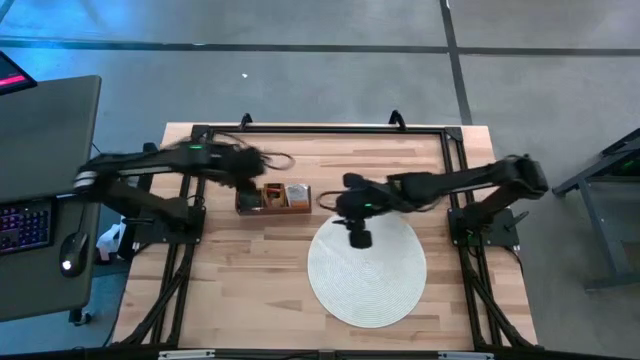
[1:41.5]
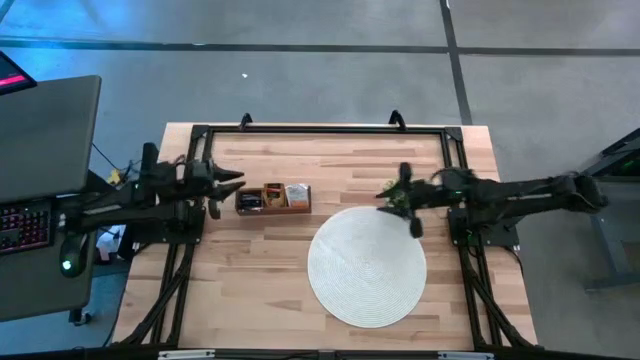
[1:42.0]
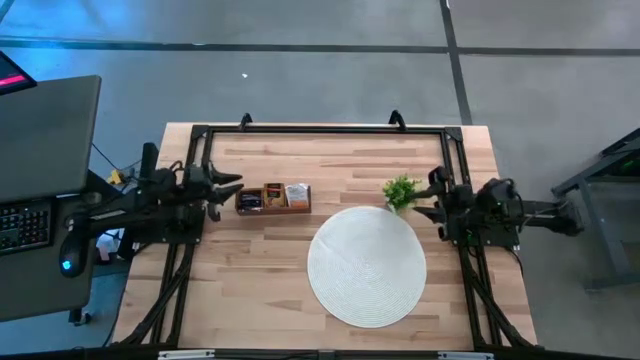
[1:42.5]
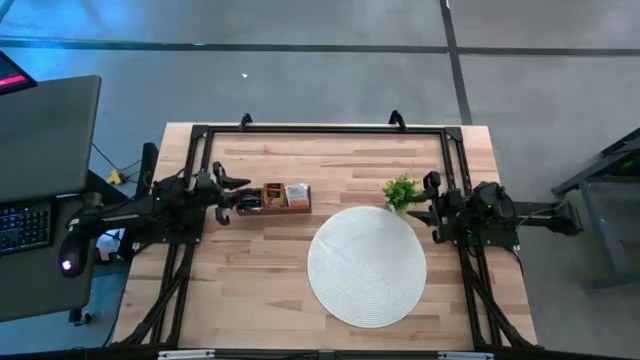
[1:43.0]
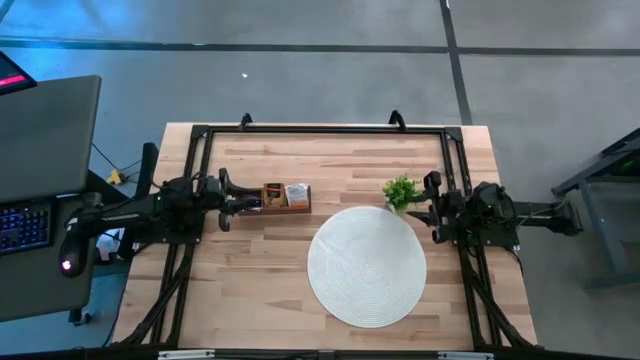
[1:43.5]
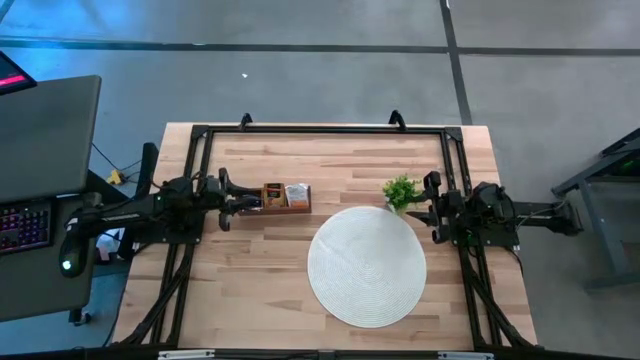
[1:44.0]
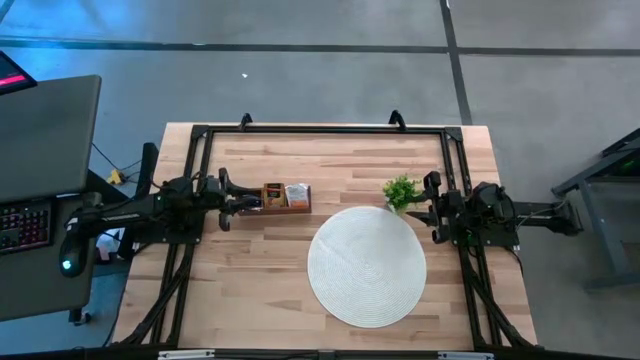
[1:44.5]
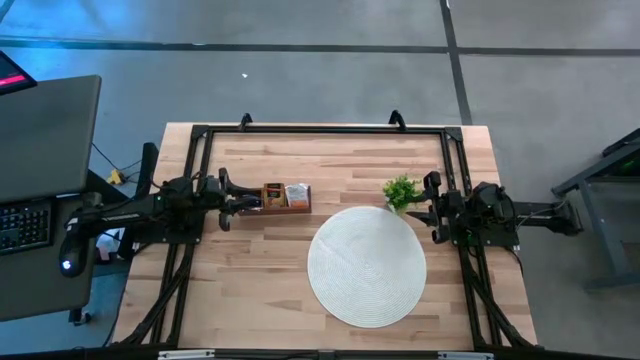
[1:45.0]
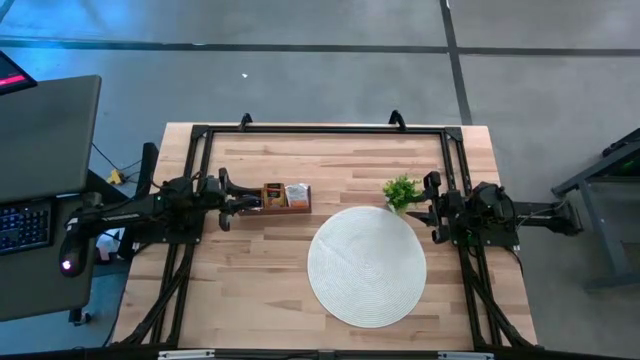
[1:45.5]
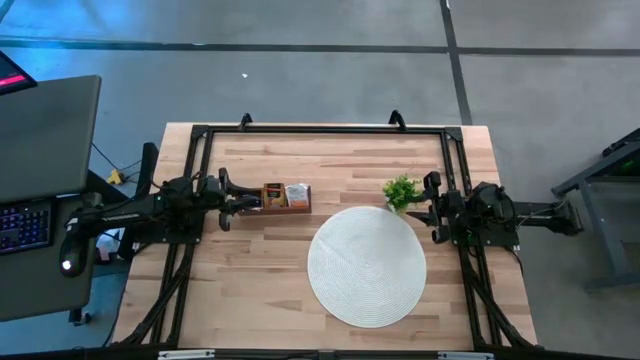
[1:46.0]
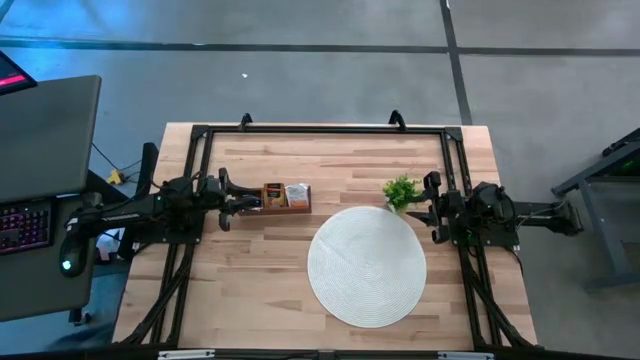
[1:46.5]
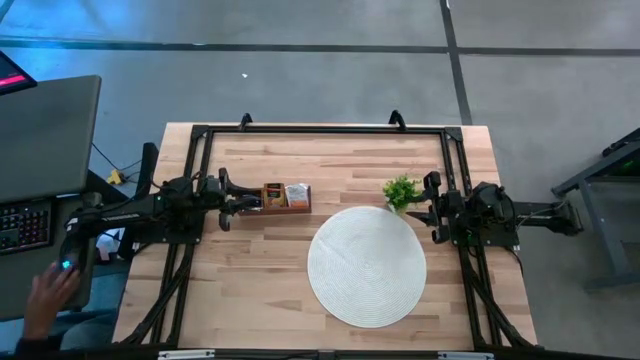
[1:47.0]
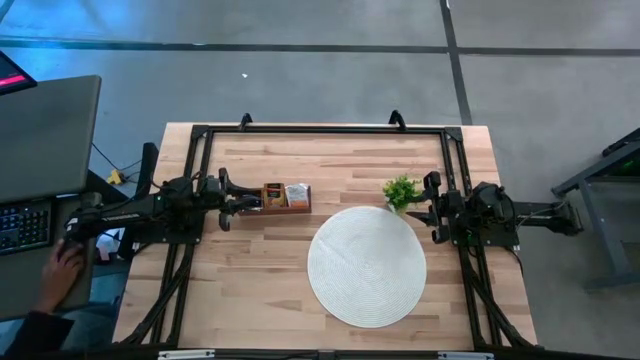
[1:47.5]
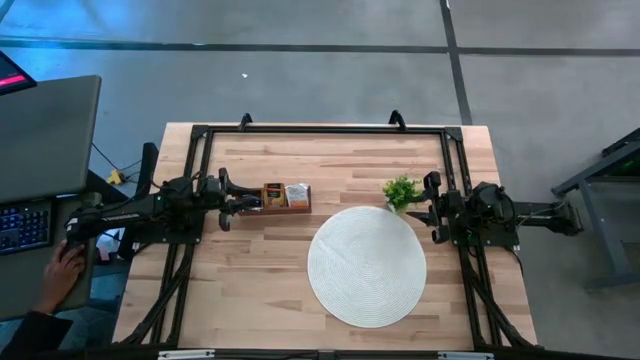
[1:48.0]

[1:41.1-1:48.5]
Task: Pick & Place Tea
Return to Home Position

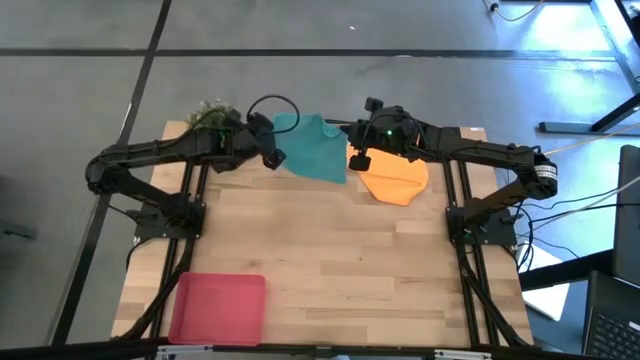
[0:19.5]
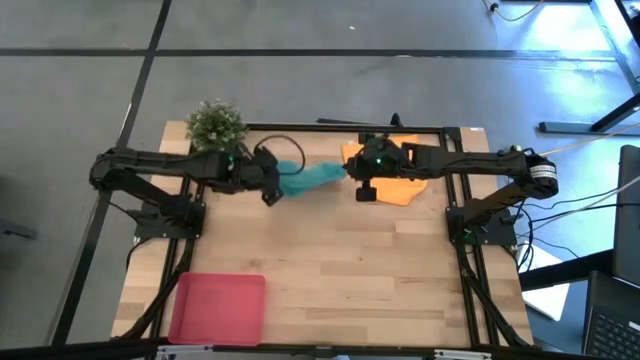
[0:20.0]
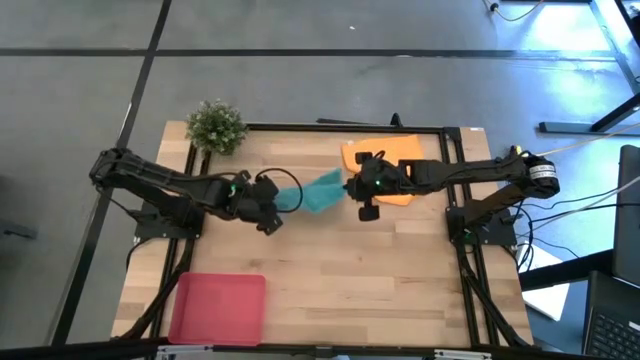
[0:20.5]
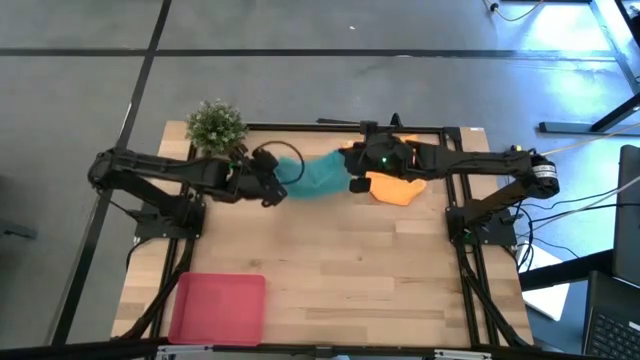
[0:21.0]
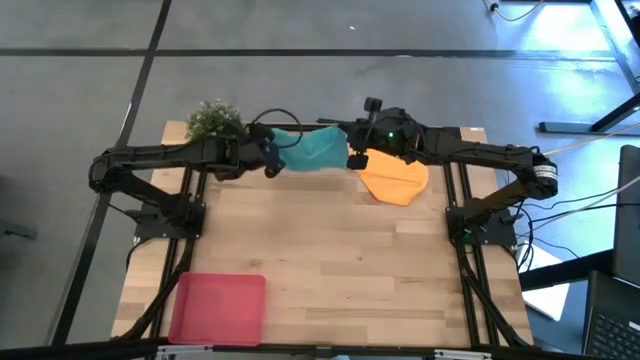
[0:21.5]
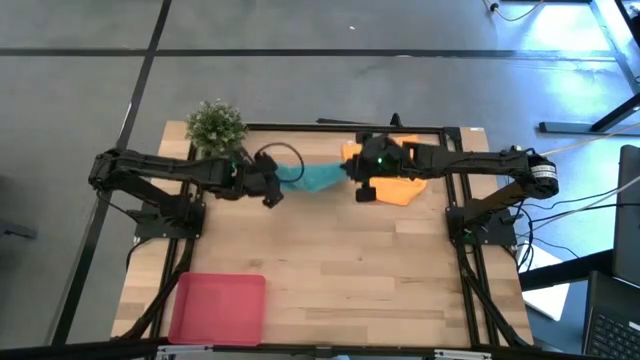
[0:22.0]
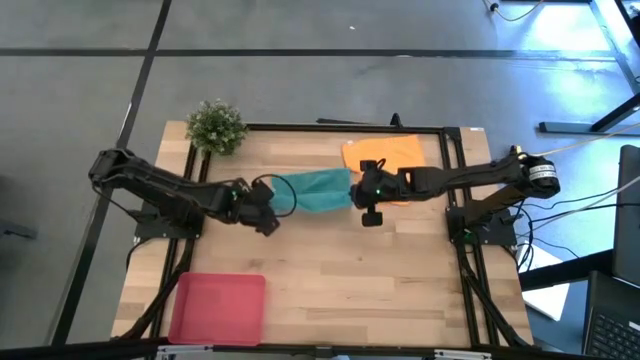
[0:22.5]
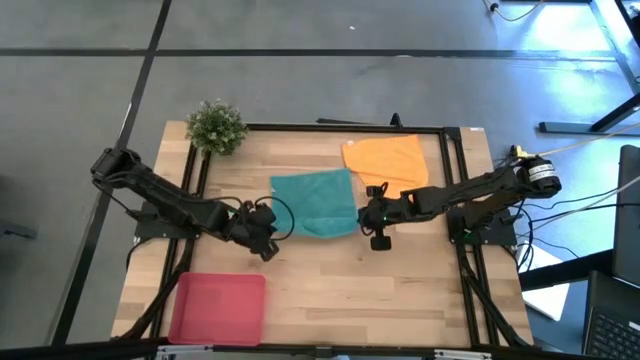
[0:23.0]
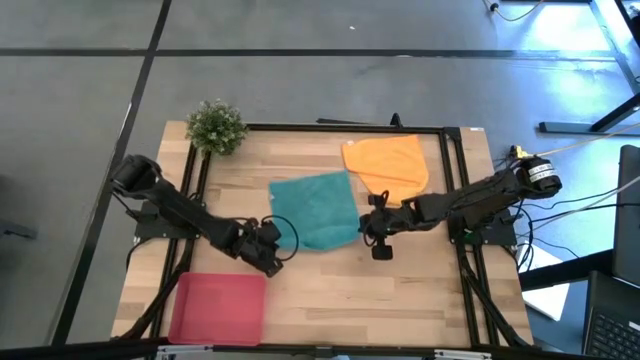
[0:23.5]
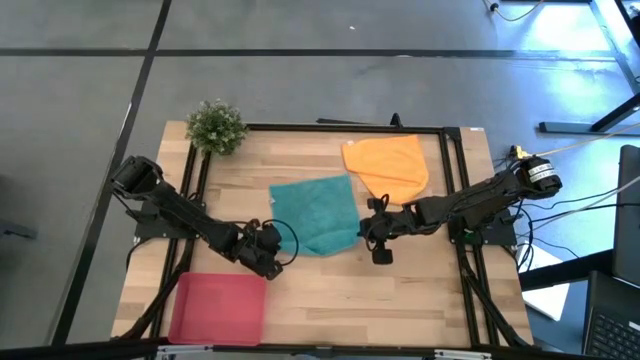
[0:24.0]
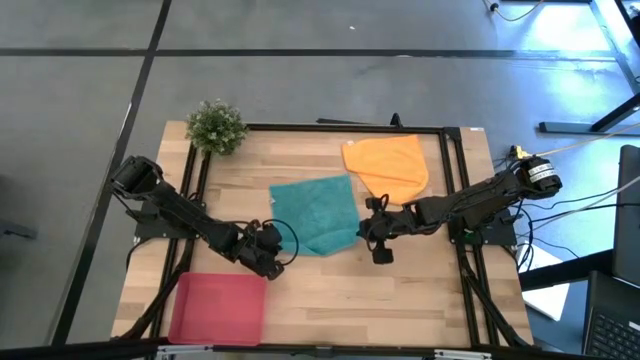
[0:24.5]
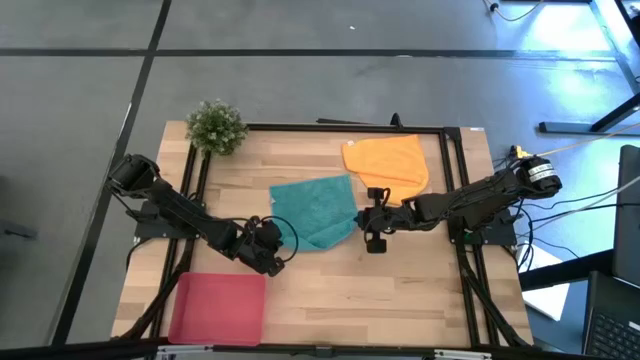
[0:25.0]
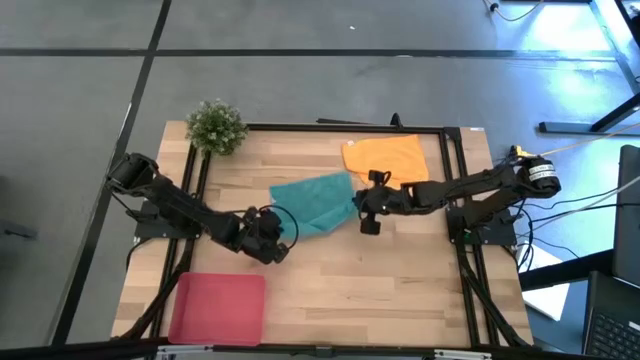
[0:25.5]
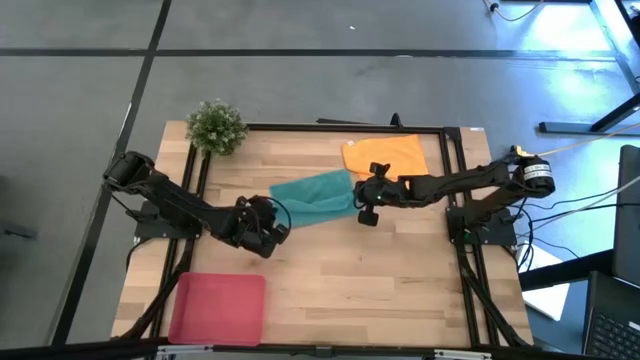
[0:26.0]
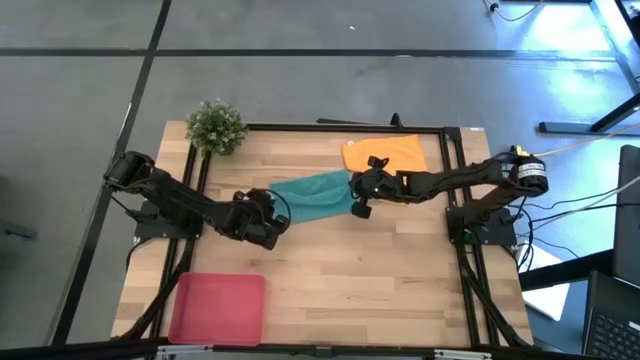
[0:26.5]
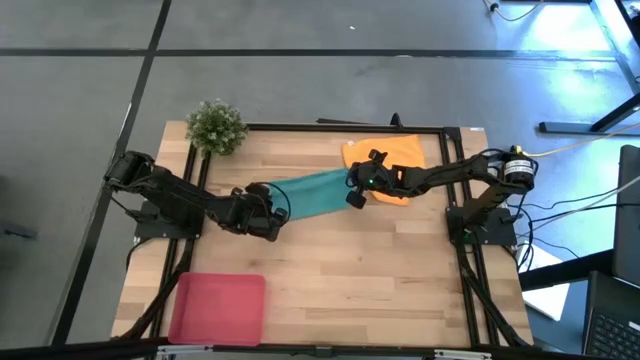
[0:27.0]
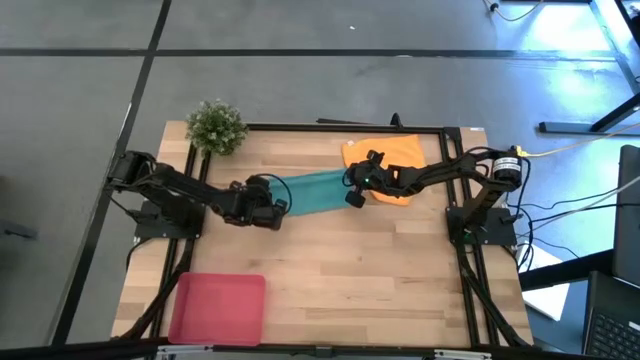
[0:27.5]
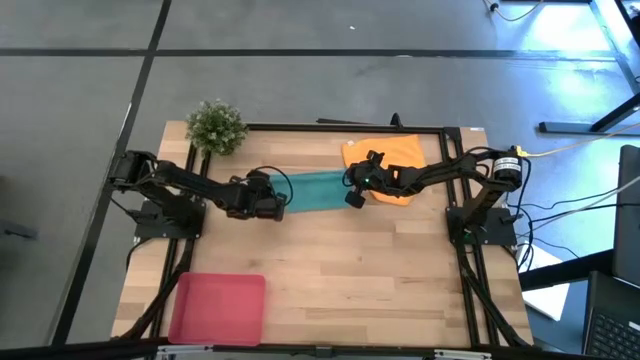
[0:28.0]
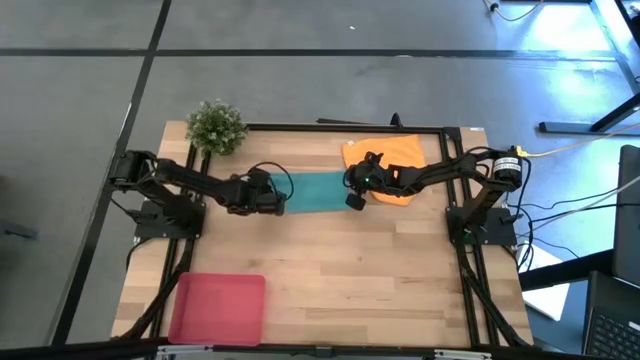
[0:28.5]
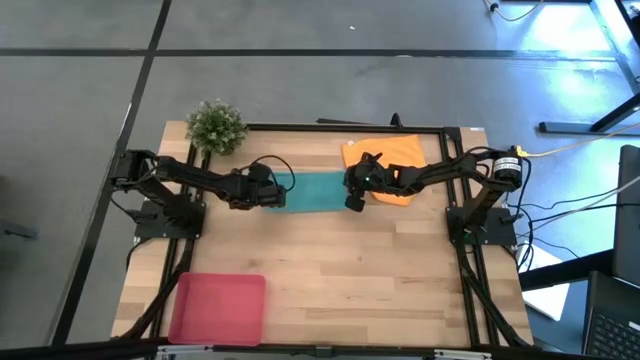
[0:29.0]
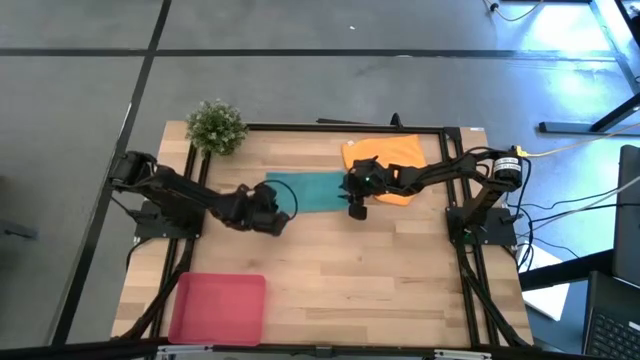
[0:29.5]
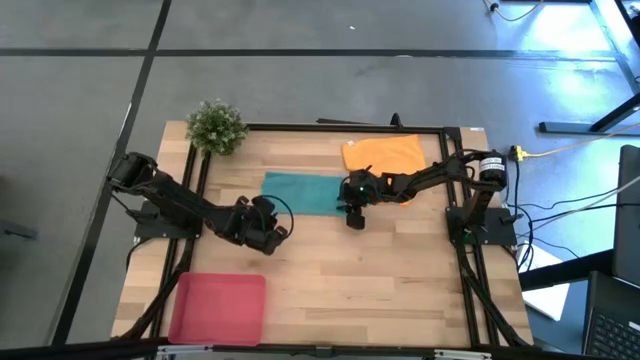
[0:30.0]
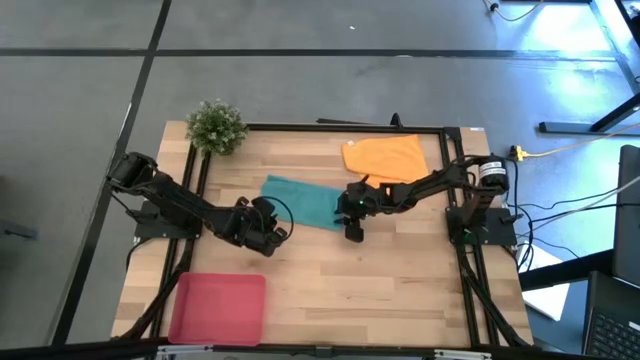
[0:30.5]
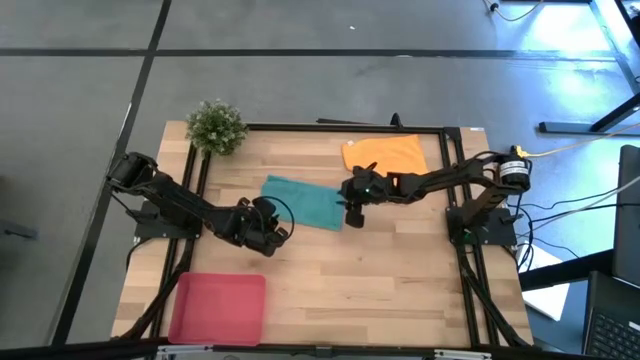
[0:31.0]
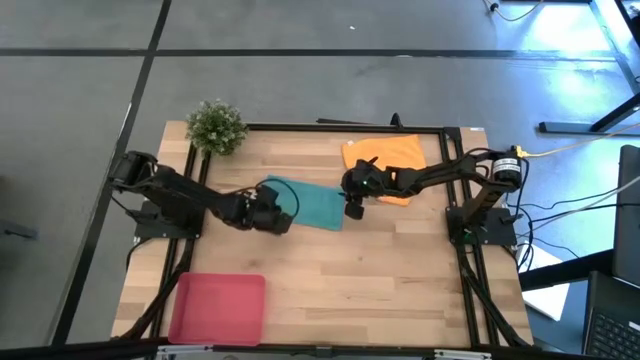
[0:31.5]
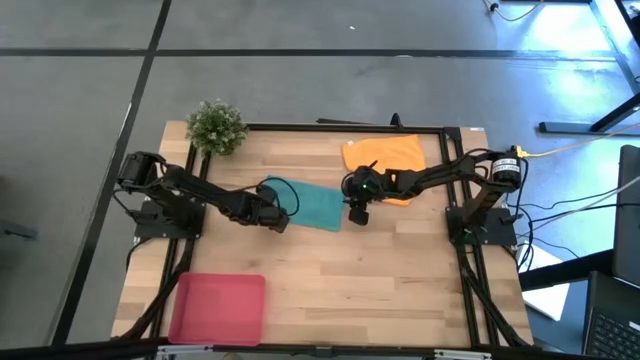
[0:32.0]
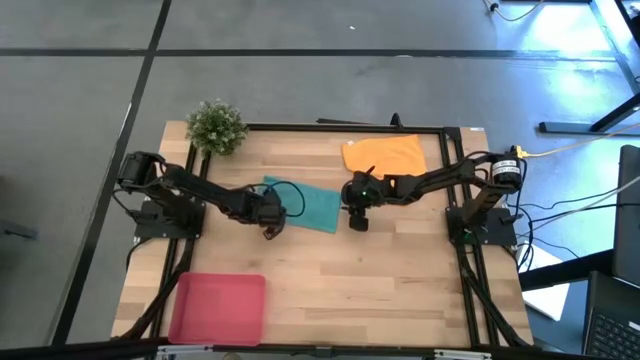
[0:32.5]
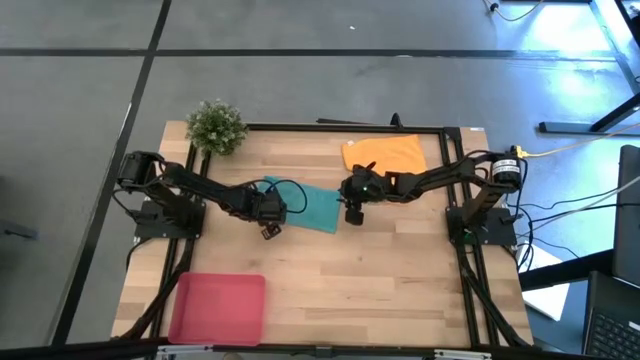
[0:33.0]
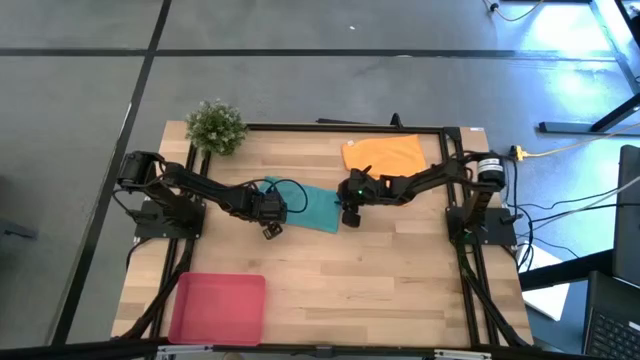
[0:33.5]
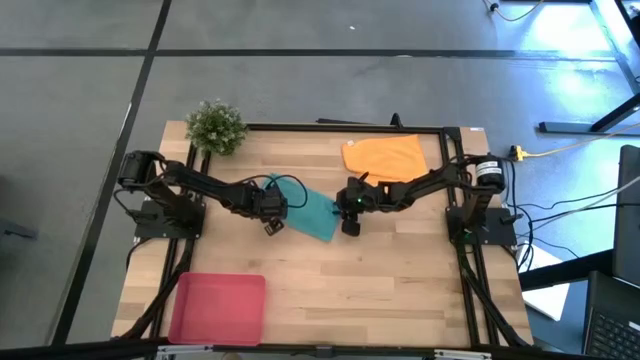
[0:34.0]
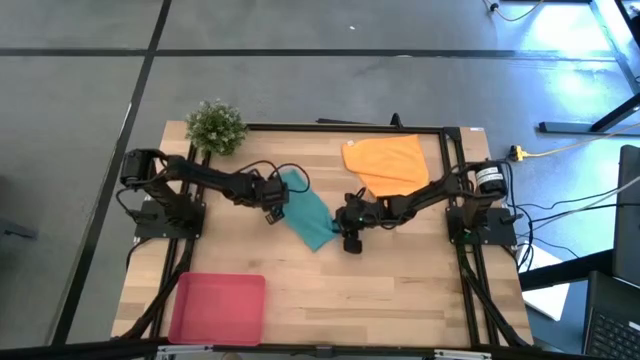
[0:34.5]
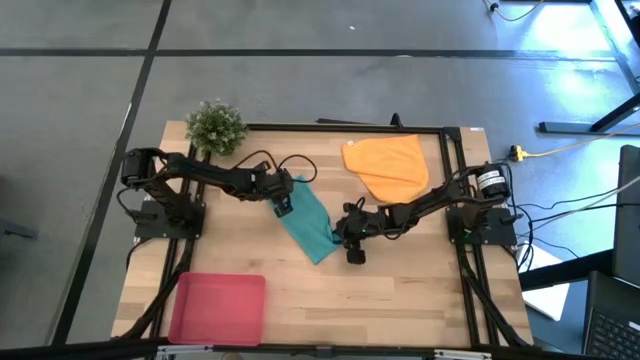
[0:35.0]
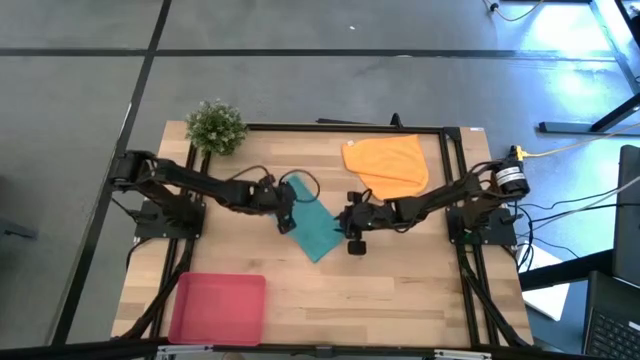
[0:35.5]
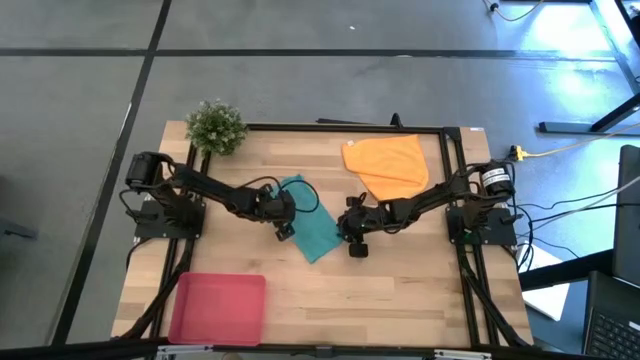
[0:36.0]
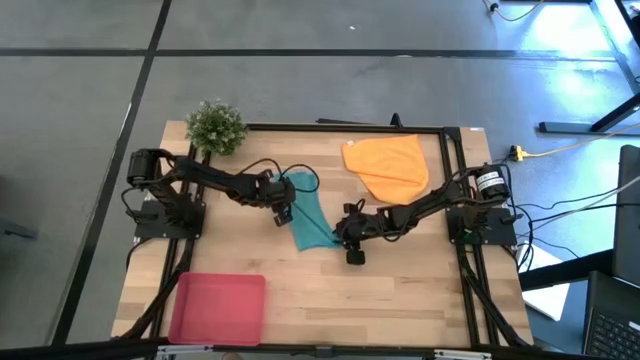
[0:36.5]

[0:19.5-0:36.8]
Task: Roll microfiber towels into tight, uniform cylinder then place into a basket
Fold the blue microfiber towel
